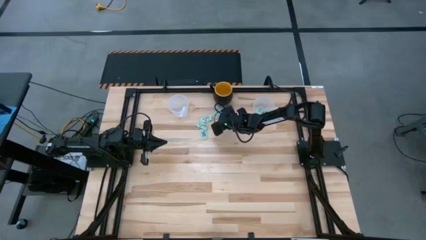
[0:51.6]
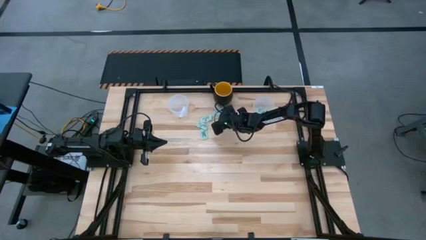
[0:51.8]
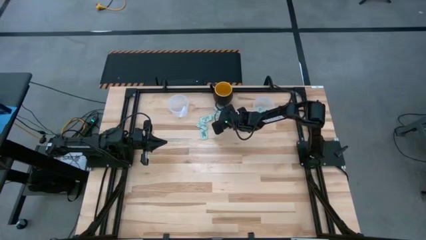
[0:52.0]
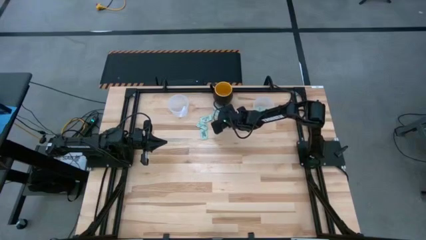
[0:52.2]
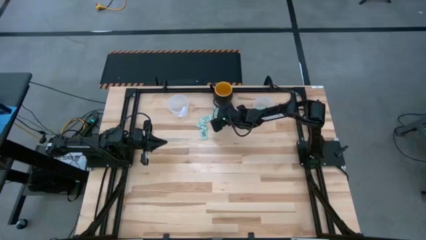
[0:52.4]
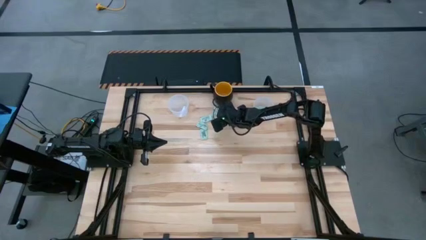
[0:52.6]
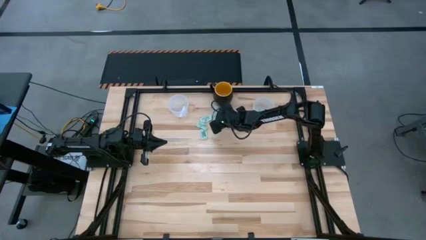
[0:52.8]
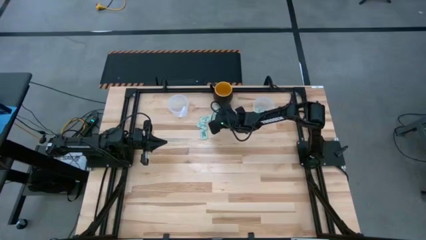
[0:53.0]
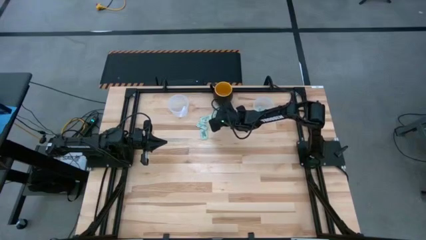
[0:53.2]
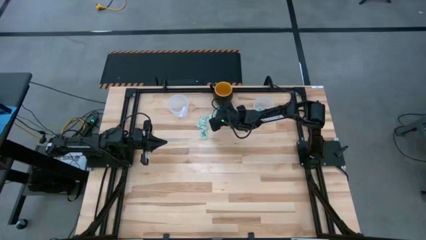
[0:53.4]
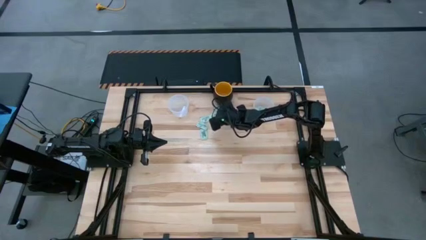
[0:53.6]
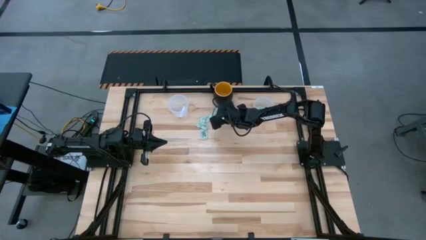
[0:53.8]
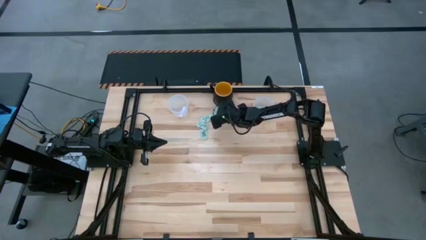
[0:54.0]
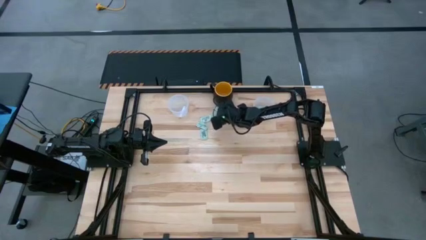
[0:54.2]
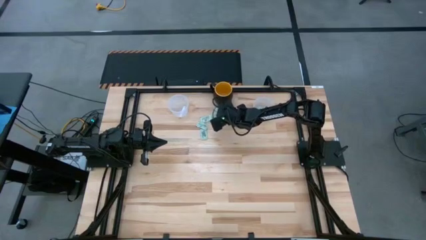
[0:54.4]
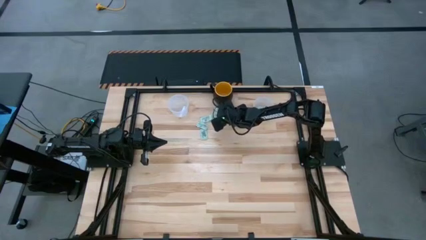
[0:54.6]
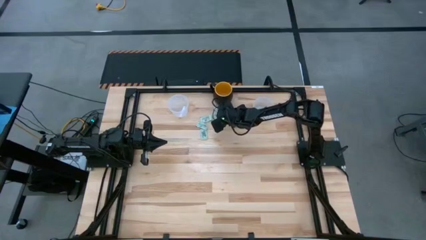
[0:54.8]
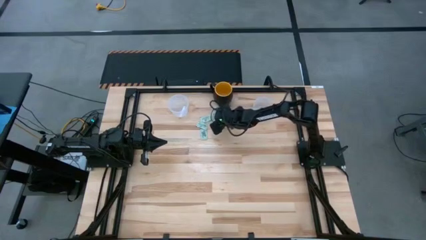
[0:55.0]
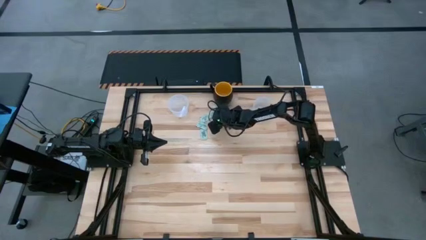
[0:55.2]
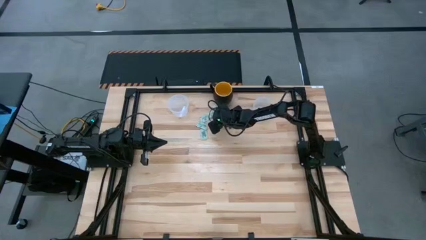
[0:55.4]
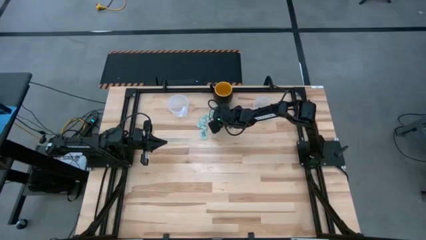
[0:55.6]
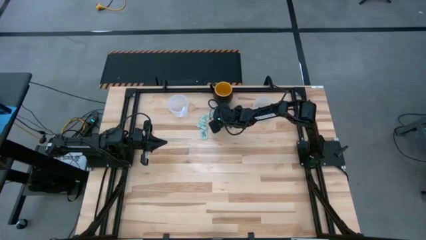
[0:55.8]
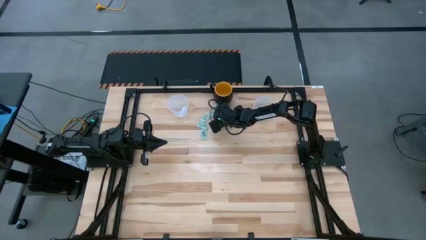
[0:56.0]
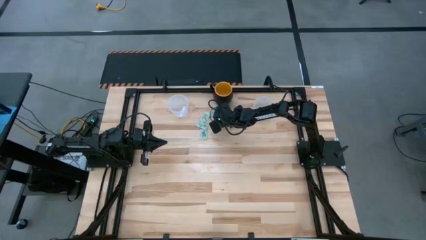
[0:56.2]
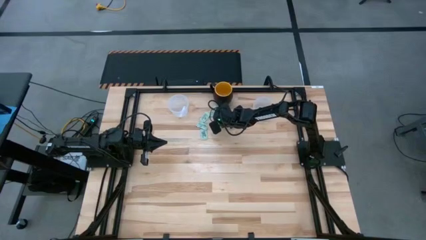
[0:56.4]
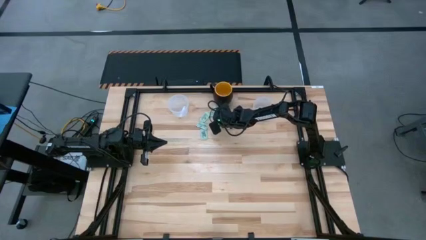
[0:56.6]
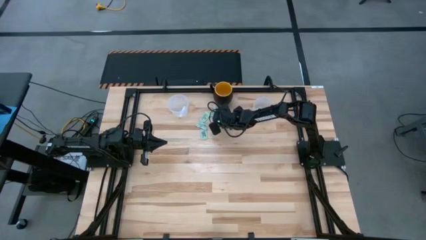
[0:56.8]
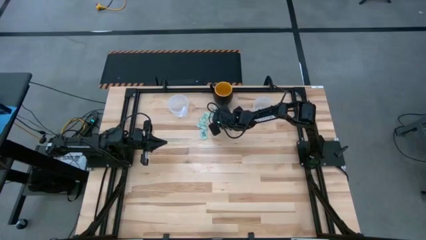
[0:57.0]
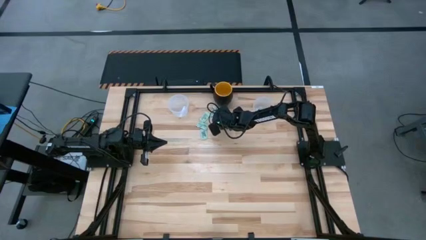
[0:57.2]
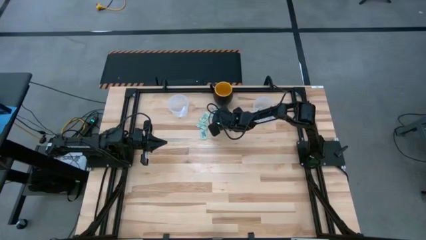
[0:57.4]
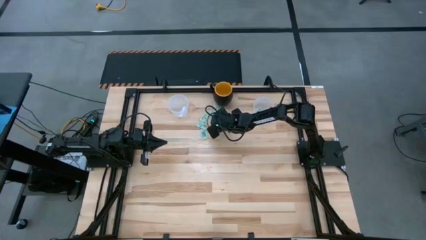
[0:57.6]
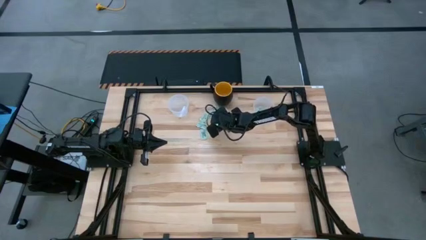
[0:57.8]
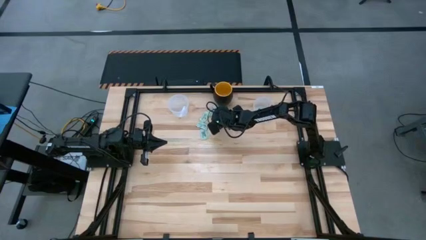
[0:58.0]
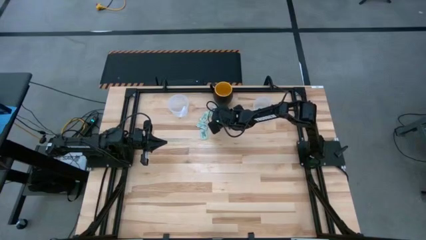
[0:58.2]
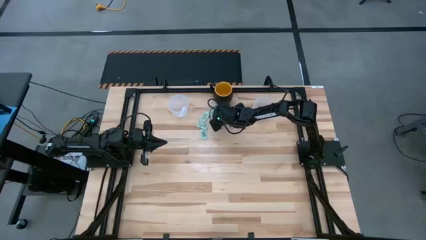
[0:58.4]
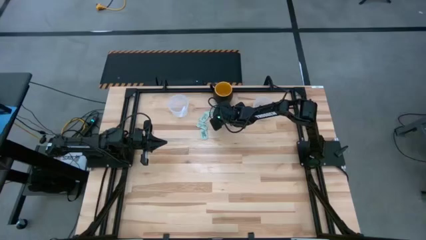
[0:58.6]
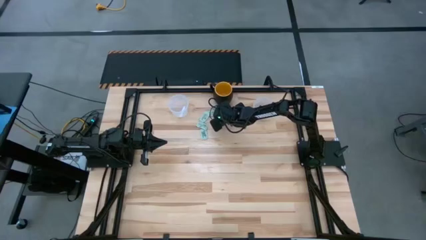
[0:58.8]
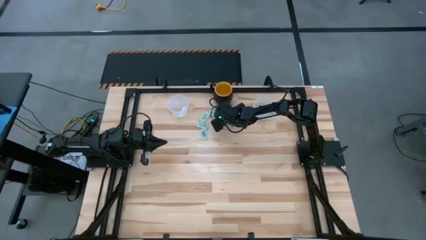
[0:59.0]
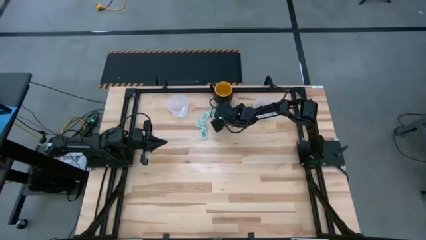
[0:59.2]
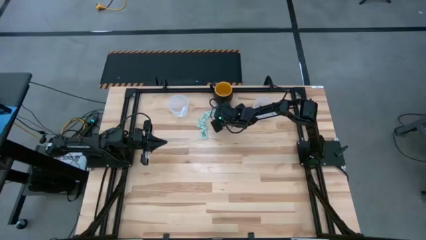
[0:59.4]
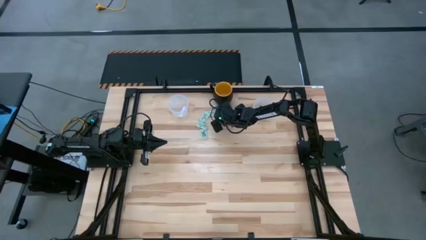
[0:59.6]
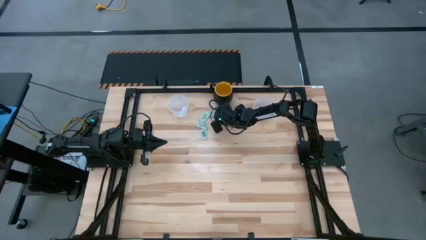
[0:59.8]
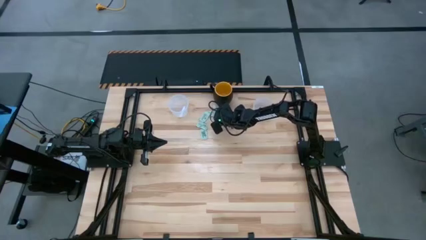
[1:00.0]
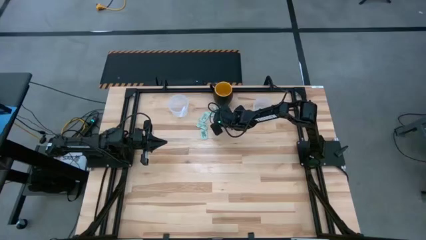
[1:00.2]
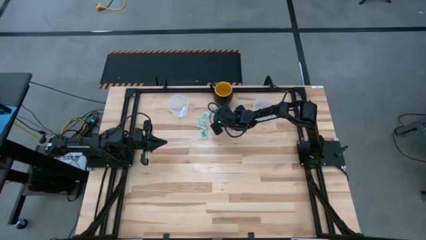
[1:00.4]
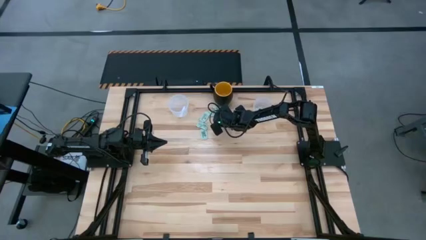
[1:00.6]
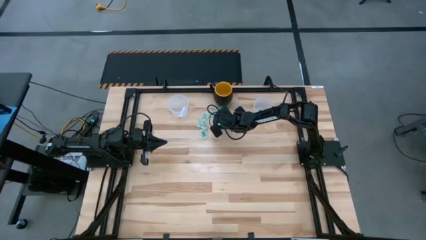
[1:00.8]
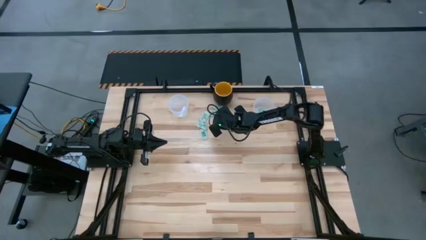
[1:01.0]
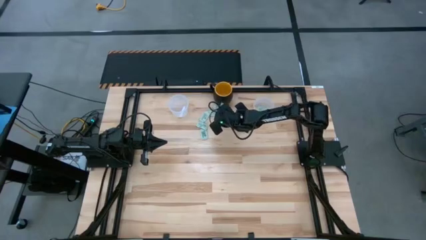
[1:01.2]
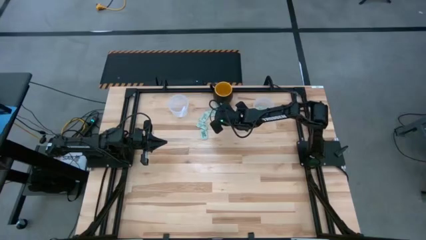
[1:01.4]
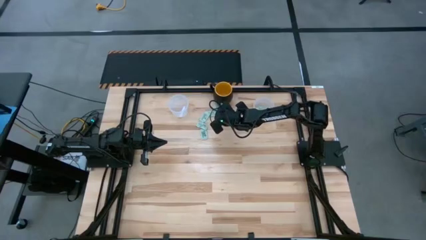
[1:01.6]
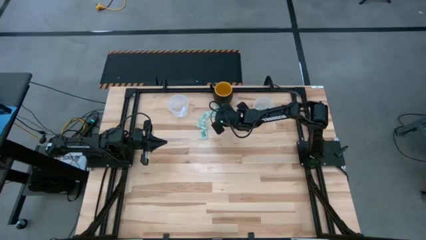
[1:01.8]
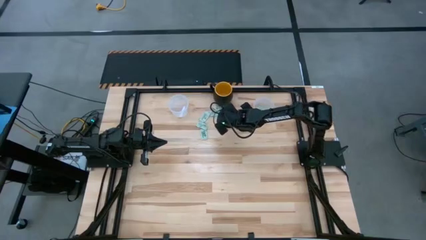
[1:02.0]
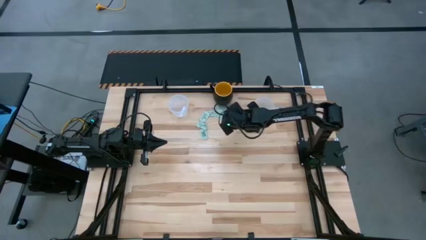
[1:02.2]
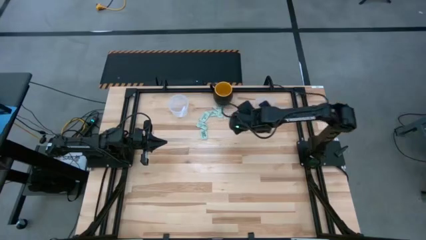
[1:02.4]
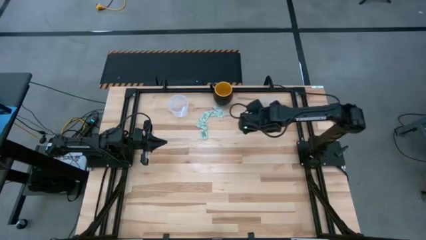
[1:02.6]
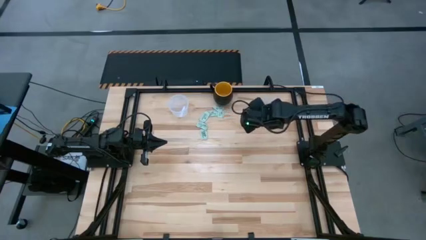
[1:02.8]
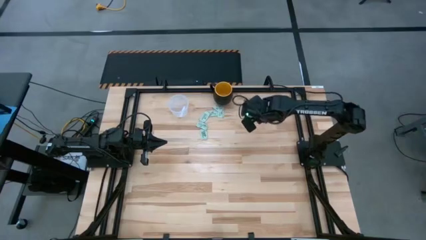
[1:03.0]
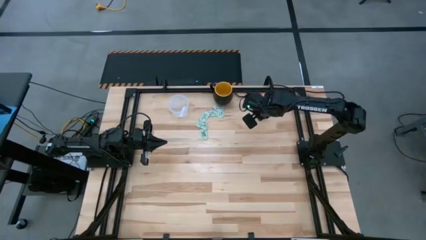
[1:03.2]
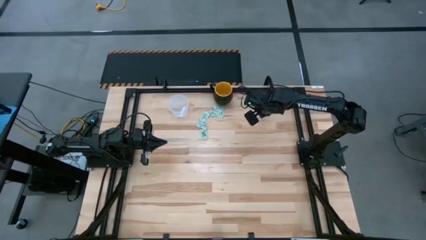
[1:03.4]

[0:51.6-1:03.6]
Task: Pick and place Stevia / Truvia into bins
Put the stevia packet into the right transparent container
